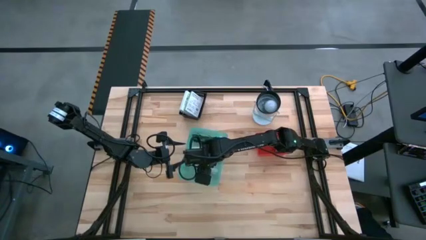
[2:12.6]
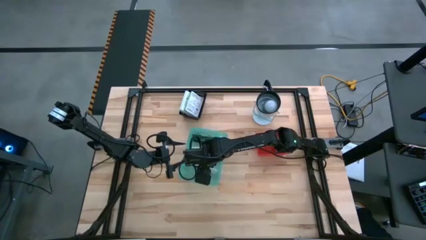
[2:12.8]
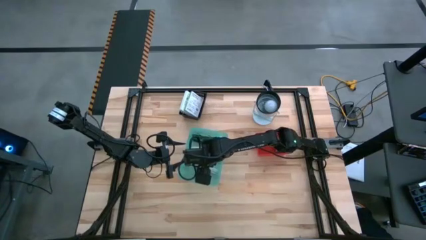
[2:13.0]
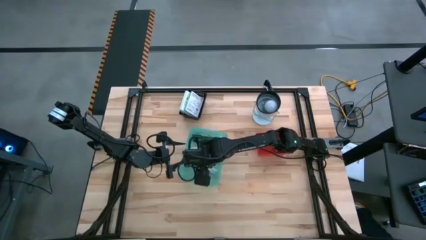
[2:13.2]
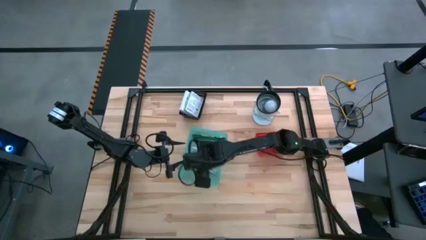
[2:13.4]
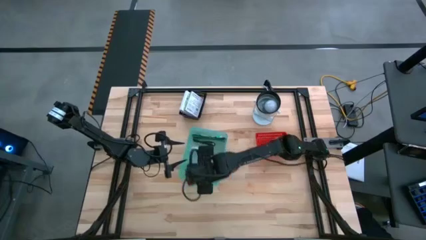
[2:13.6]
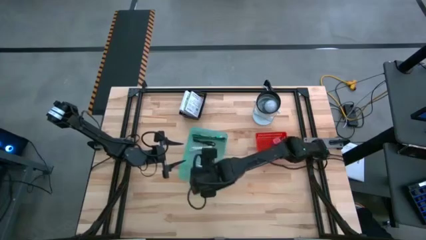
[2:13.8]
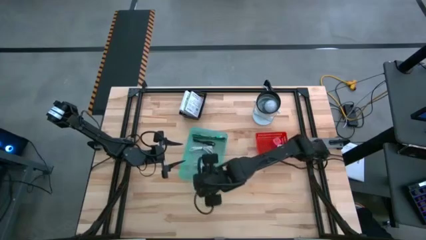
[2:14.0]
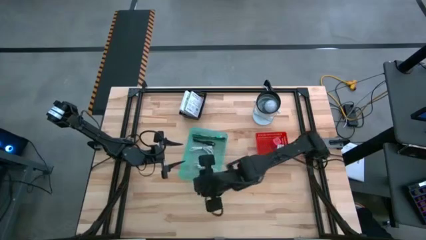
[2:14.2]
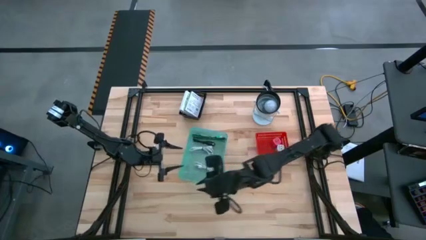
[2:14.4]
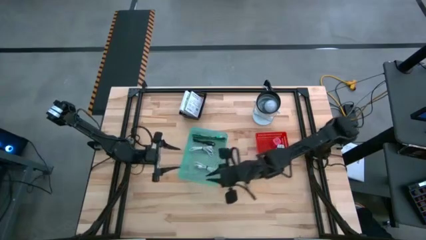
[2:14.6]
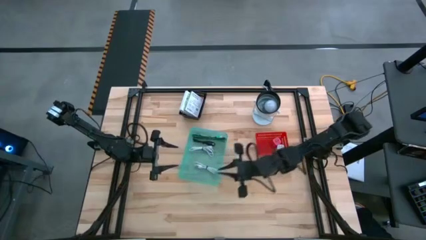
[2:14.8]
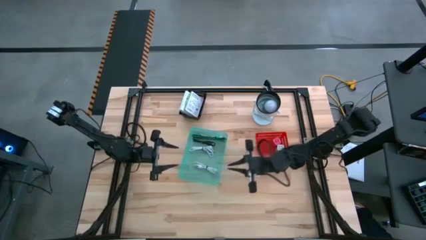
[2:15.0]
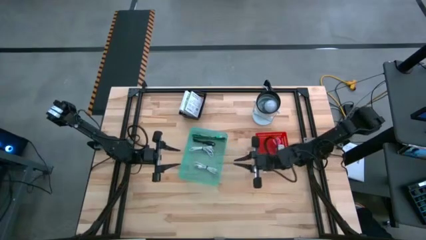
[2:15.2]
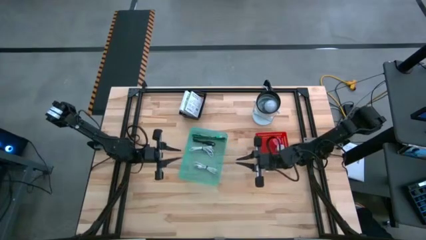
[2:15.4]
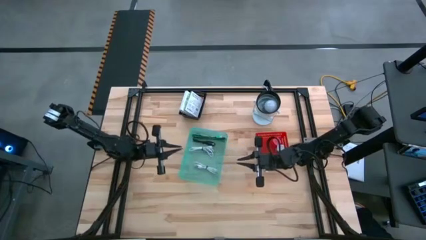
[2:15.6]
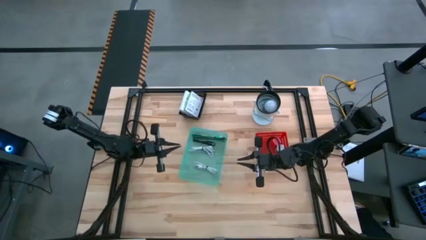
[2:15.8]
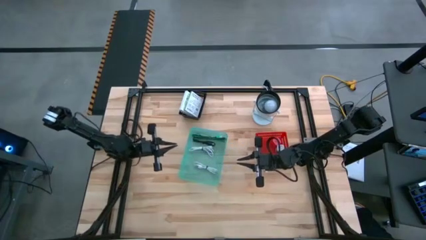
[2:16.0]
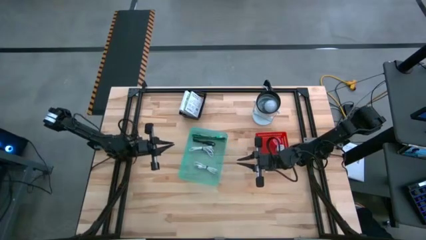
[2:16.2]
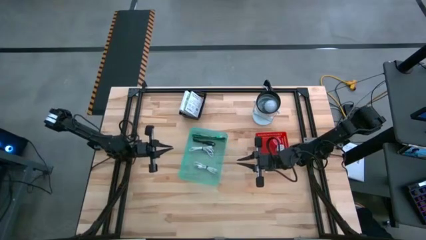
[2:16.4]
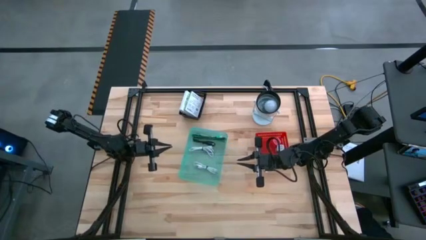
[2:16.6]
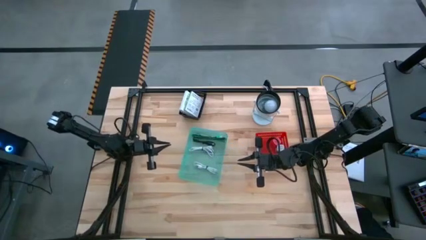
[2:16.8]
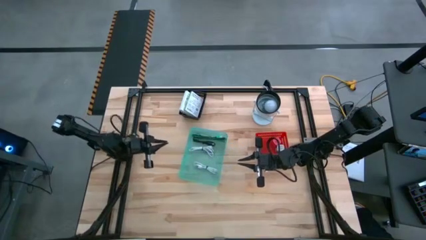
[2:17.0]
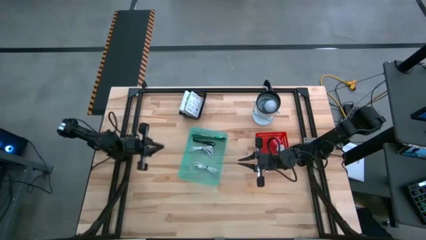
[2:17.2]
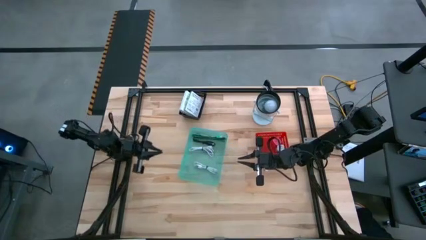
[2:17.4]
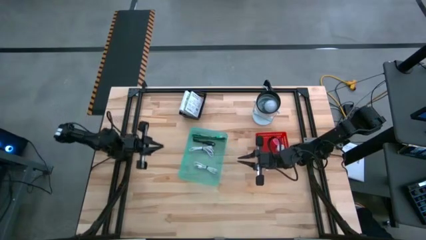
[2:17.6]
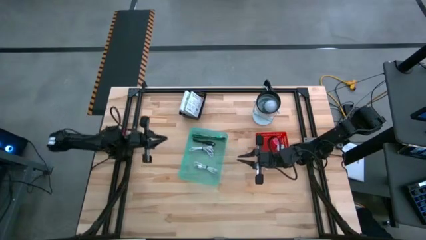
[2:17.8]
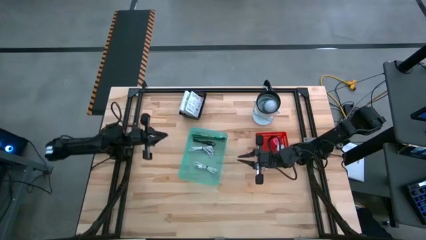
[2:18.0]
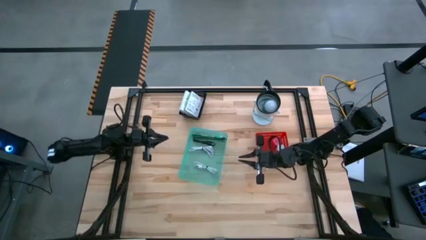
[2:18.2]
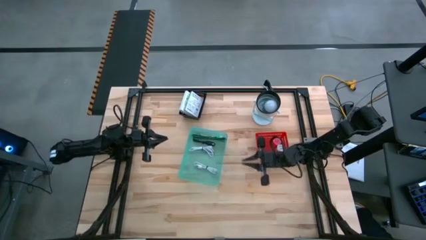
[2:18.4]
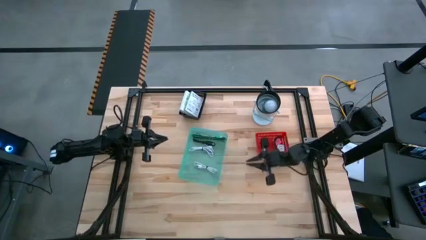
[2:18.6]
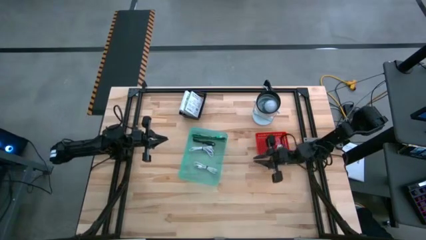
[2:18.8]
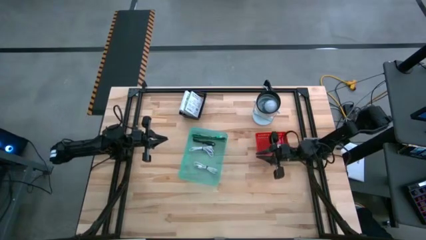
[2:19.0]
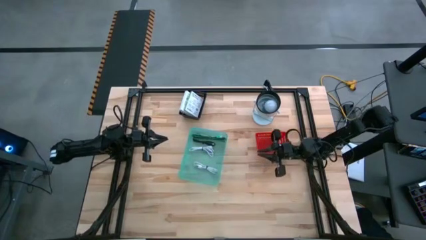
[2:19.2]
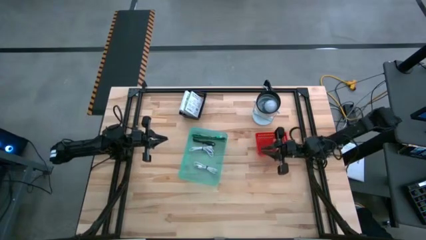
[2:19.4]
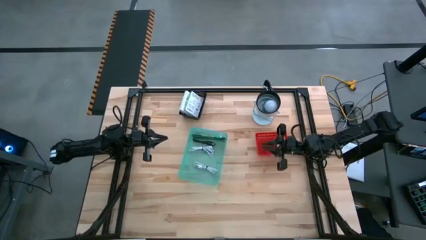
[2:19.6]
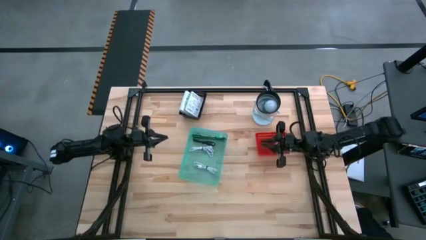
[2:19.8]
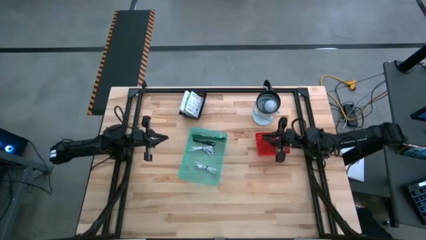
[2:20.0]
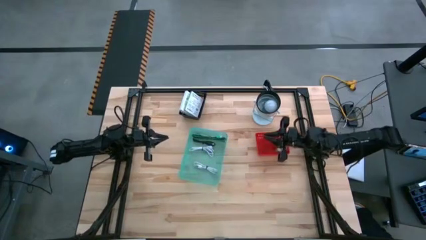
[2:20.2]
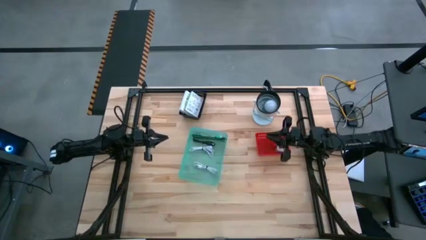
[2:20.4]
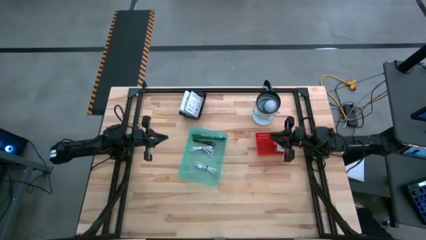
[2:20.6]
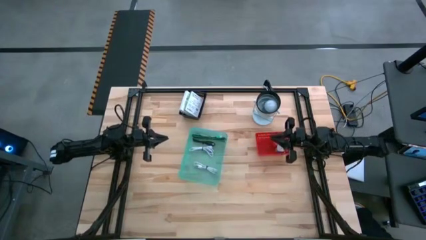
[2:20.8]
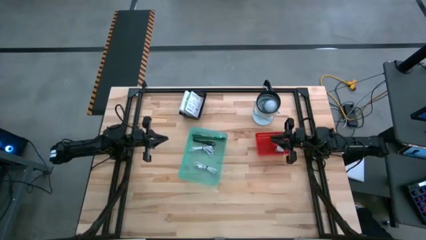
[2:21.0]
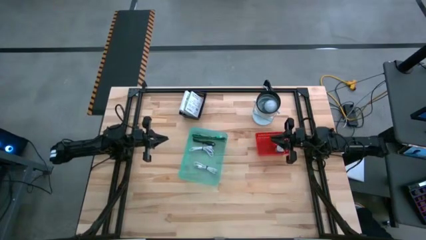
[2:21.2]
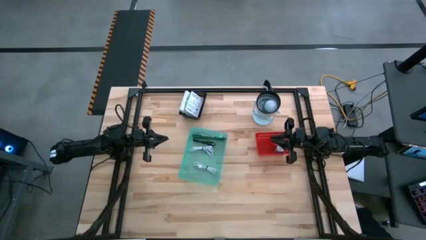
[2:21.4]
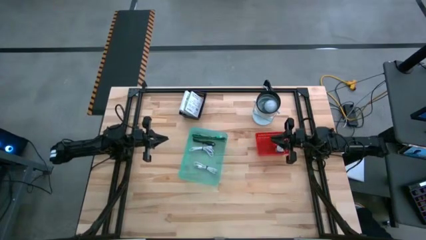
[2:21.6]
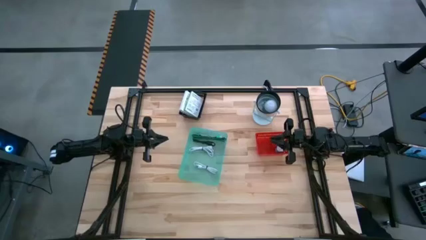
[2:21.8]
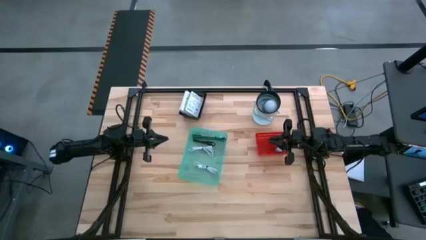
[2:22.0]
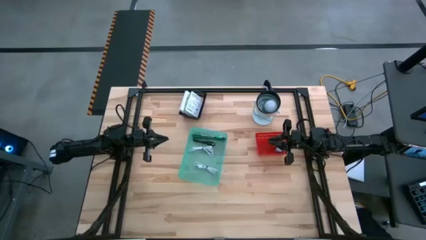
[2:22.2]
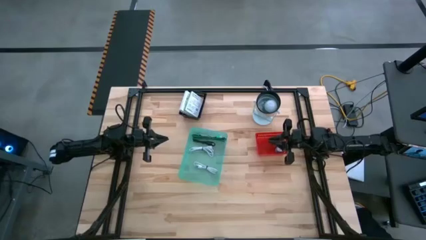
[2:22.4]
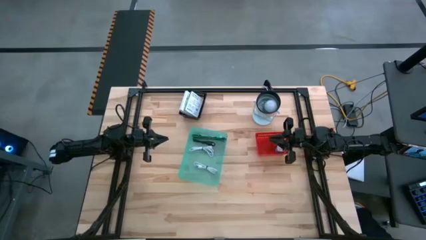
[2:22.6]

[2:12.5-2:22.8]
Task: Pick and place items into bin
Return to Home Position

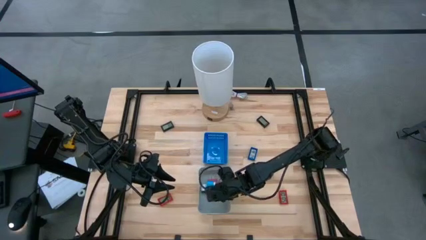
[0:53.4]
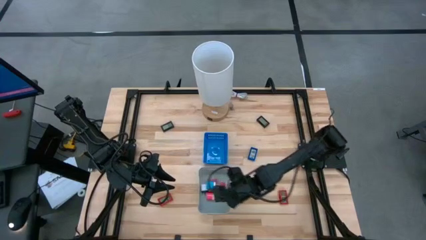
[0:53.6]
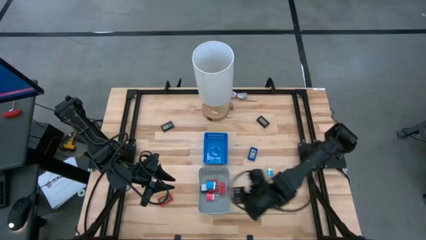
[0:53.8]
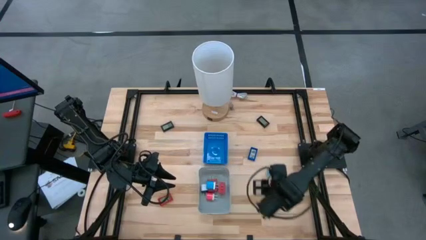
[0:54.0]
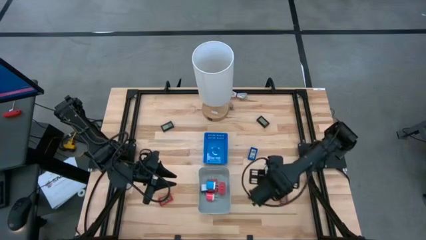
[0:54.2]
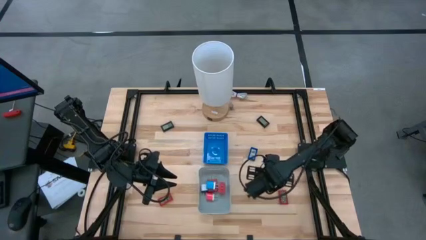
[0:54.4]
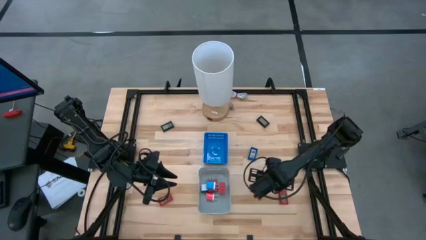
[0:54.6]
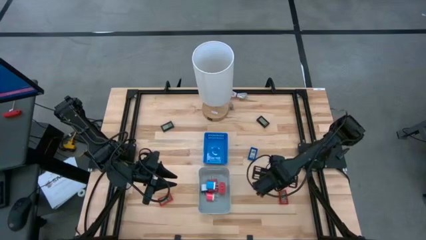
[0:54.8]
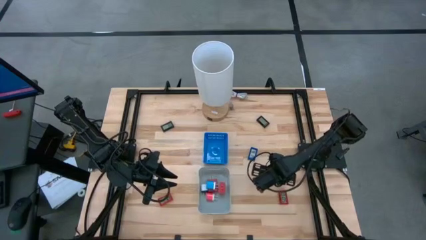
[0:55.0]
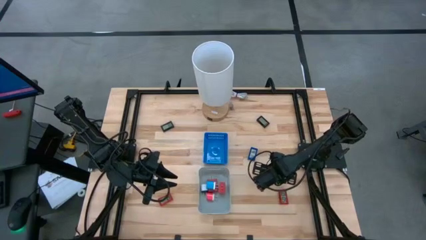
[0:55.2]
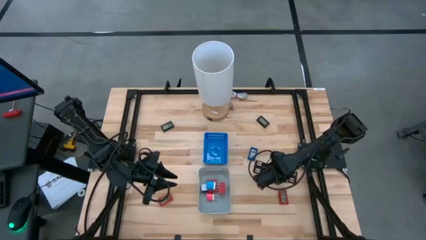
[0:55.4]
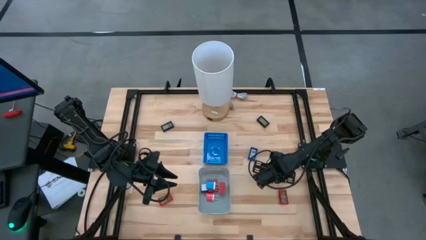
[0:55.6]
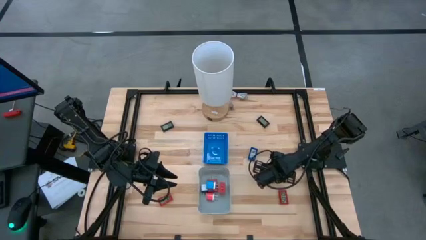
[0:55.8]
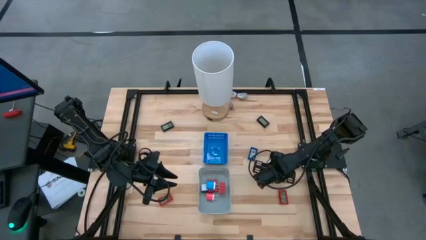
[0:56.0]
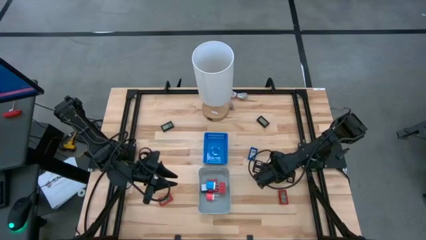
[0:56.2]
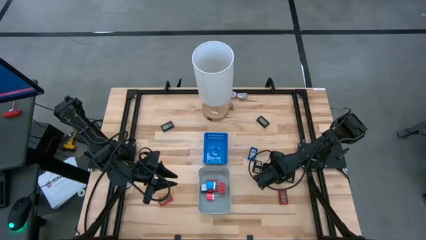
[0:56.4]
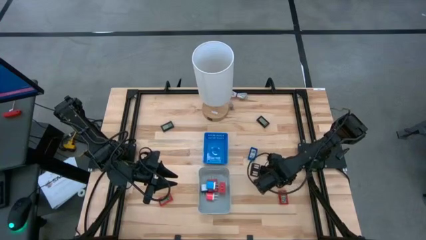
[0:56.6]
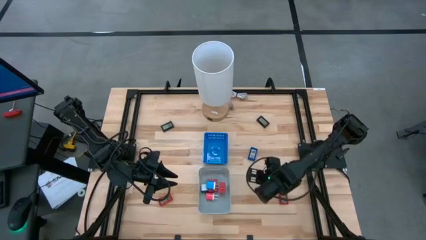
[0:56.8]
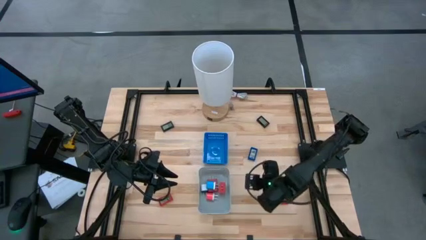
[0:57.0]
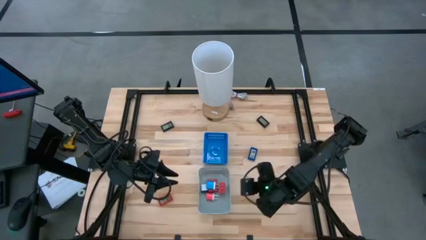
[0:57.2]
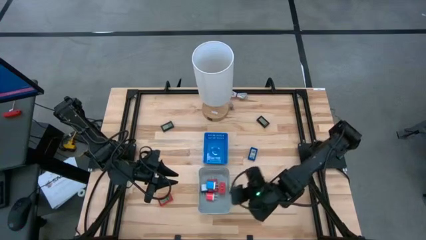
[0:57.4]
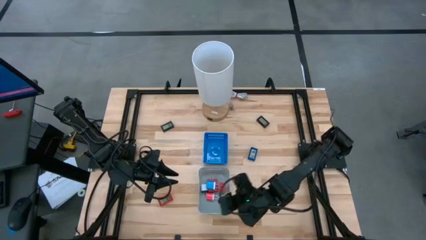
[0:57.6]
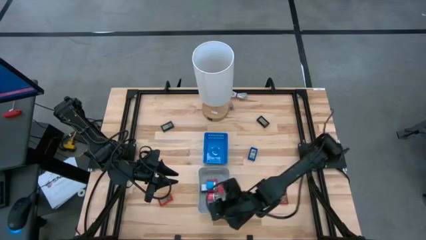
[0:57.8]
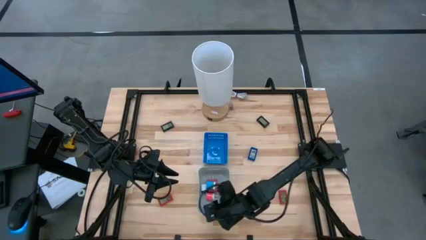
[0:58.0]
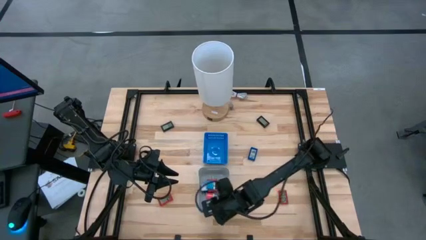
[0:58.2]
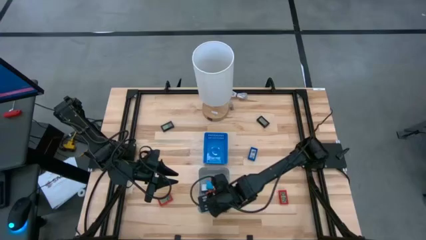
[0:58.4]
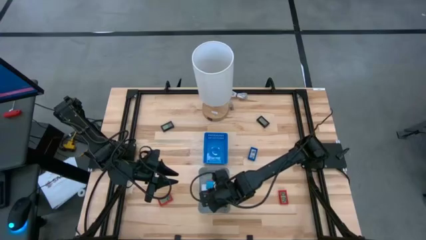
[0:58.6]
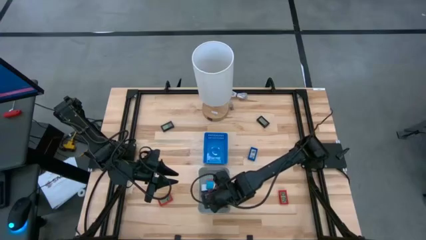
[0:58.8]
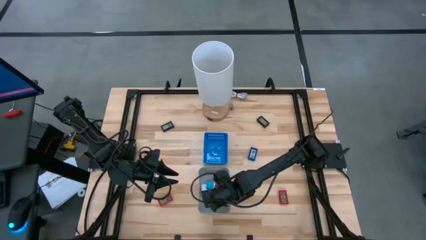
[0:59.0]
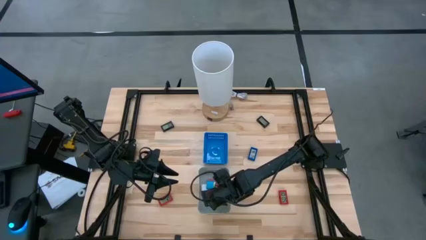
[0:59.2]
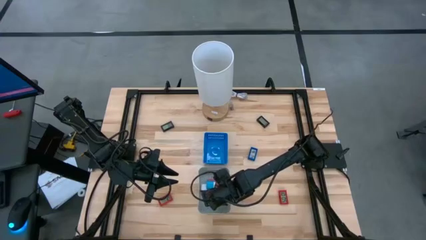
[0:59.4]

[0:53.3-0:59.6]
Task: Pick & Place Office items
Put the blue charger adapter into the gray bin
